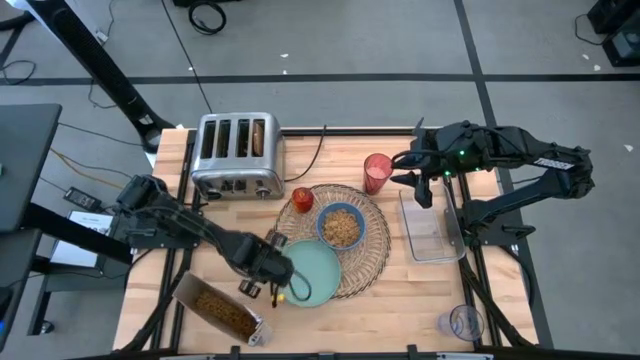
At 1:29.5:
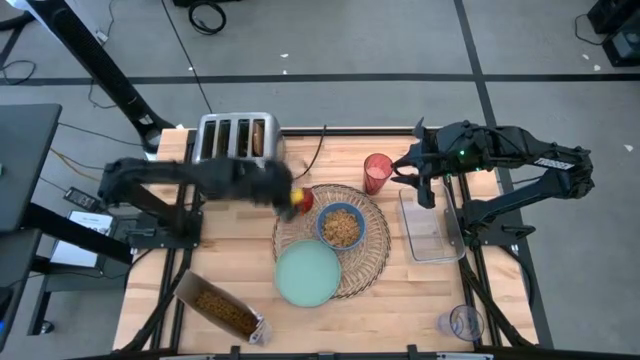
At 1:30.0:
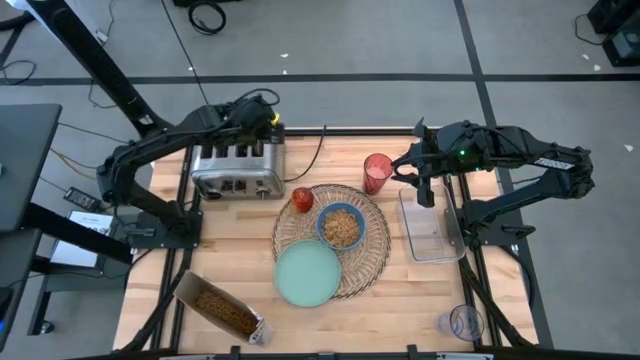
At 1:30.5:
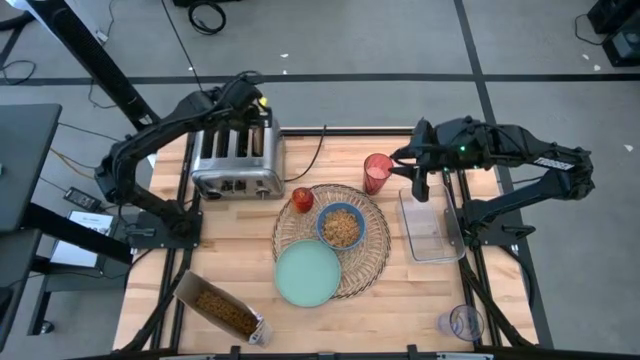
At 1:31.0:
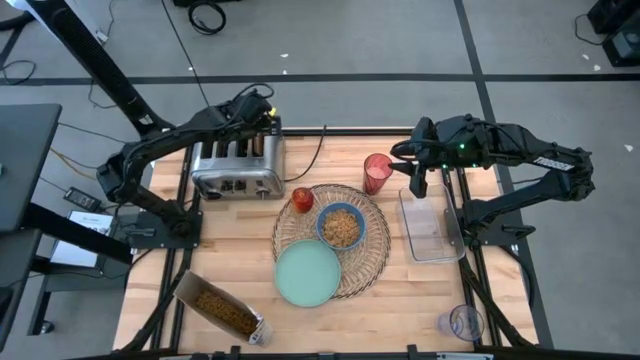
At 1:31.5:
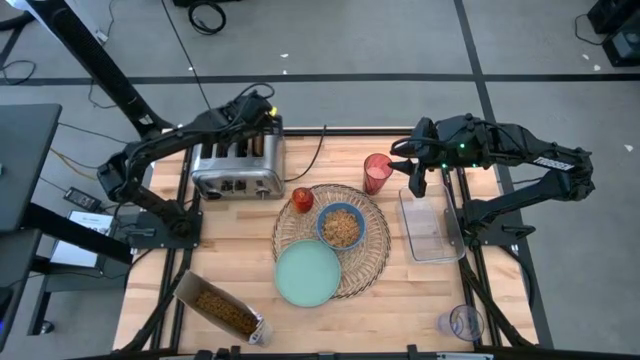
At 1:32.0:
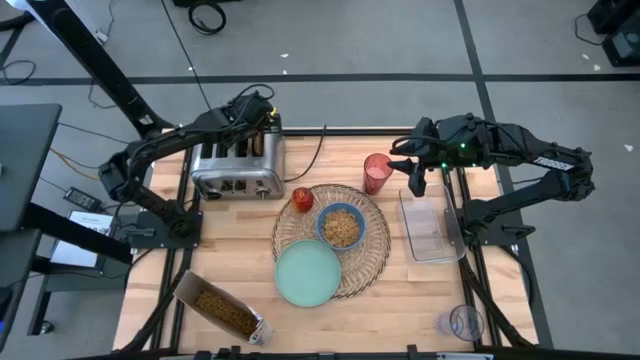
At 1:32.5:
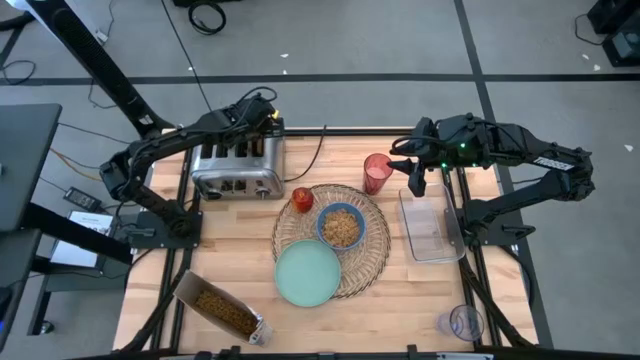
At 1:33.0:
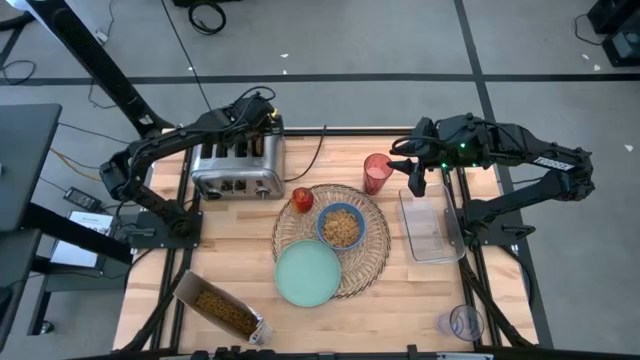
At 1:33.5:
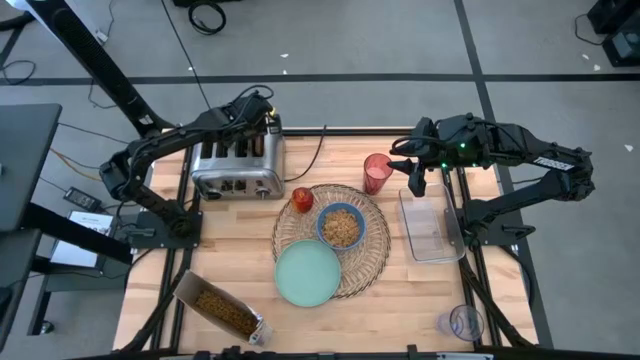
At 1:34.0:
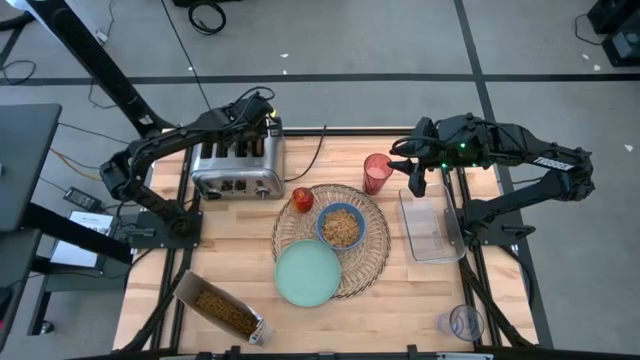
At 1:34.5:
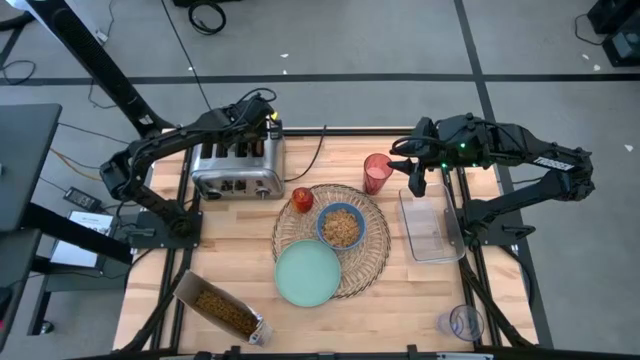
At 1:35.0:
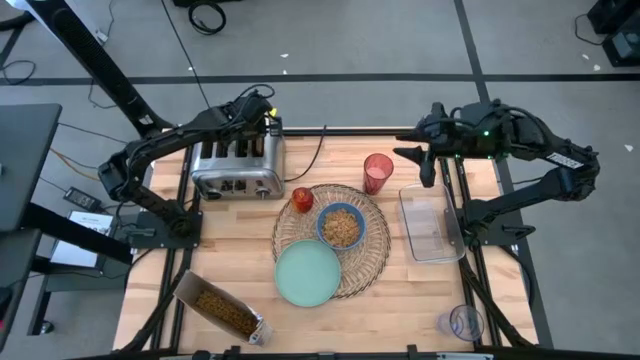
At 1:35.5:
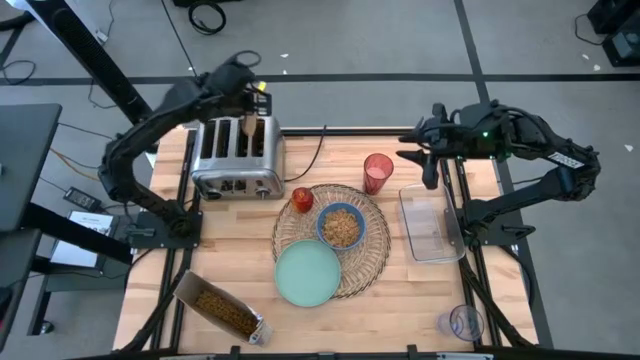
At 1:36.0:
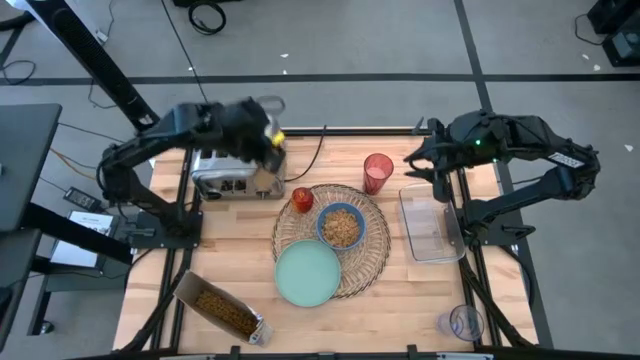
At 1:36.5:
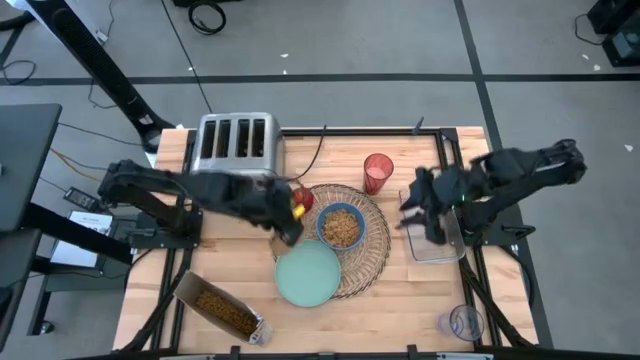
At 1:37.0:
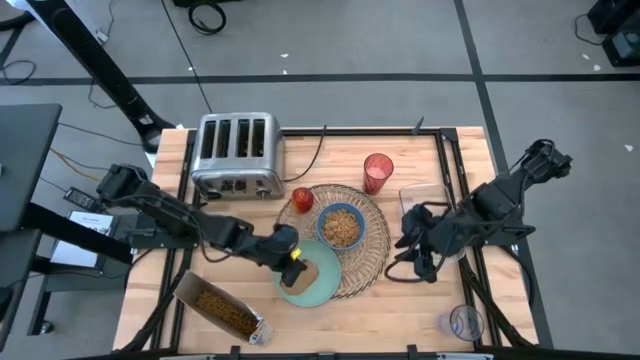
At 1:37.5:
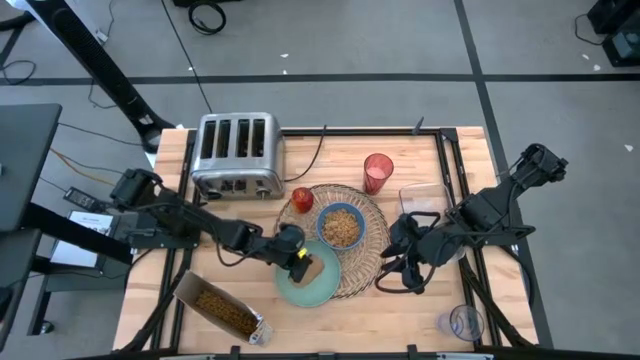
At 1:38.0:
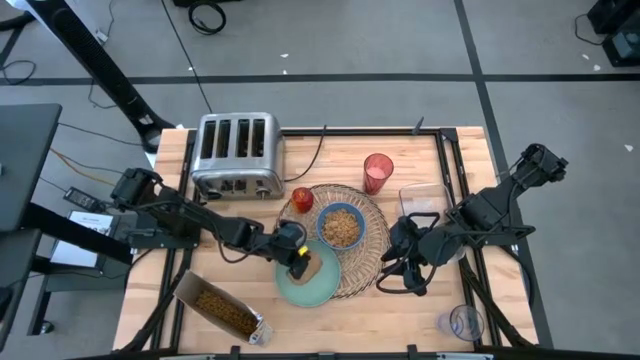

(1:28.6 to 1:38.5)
Task: Arrange a breakfast setting
Put the bagel on the light blue plate

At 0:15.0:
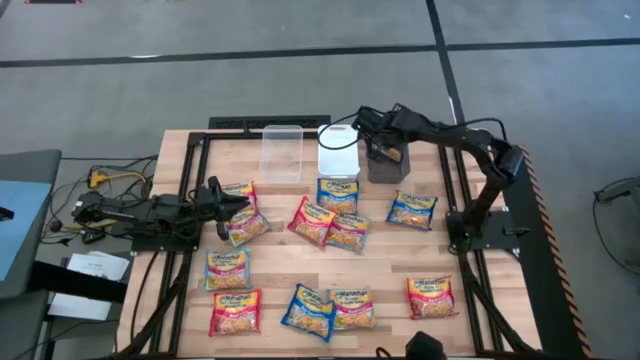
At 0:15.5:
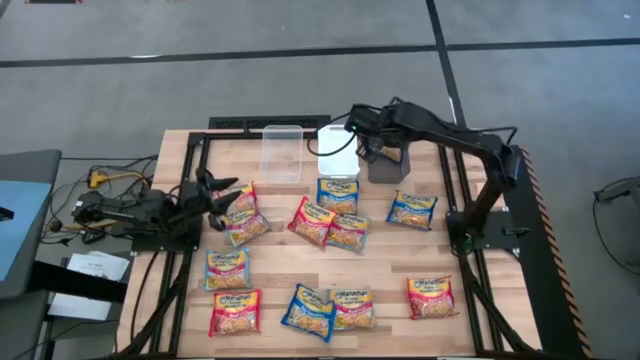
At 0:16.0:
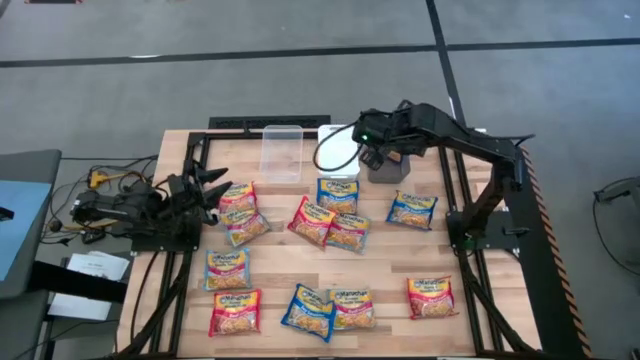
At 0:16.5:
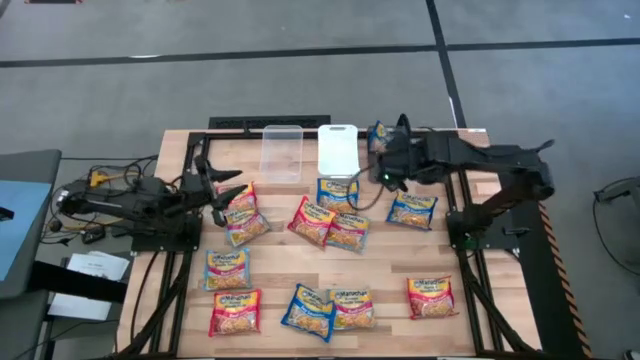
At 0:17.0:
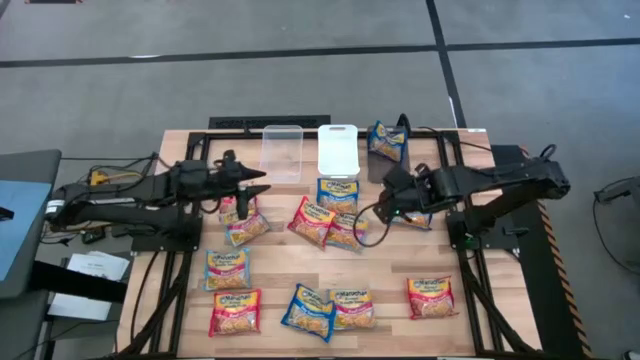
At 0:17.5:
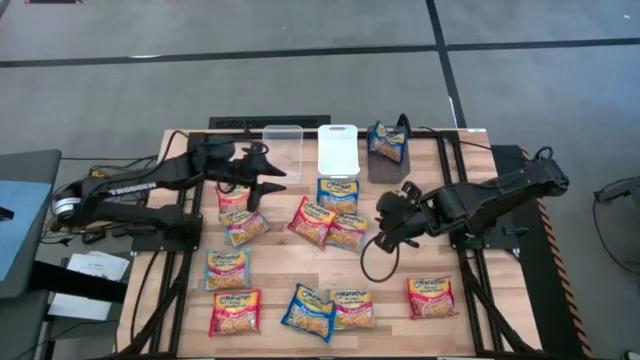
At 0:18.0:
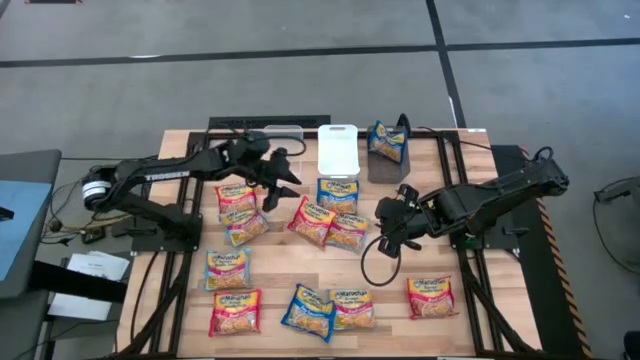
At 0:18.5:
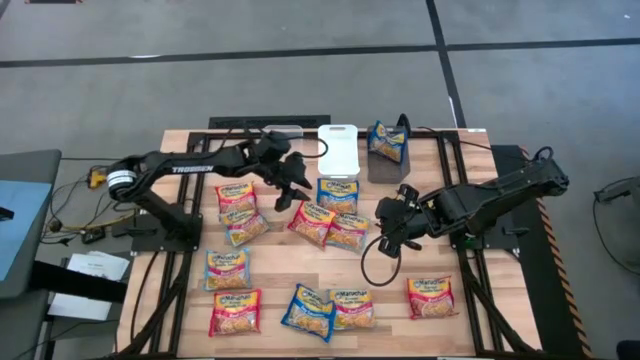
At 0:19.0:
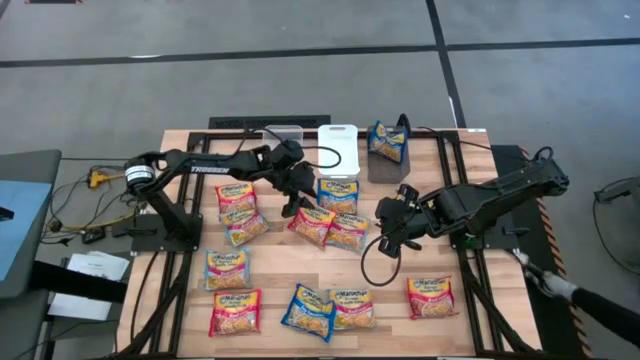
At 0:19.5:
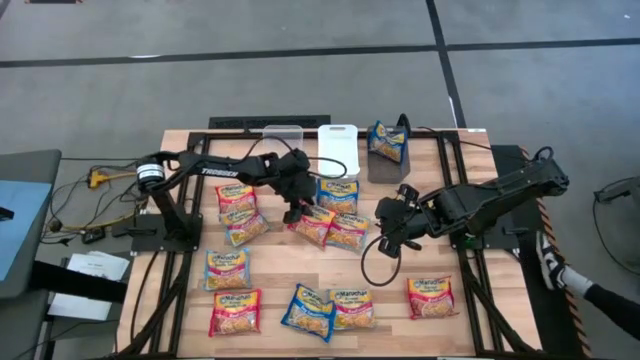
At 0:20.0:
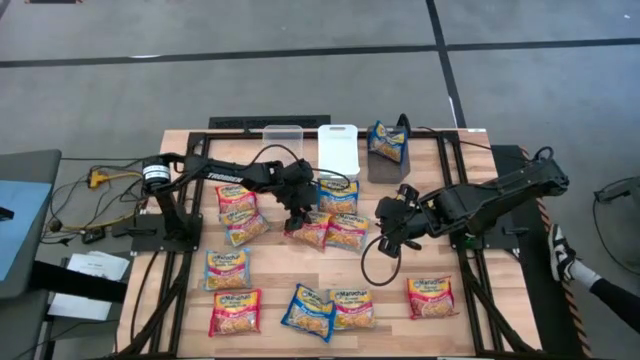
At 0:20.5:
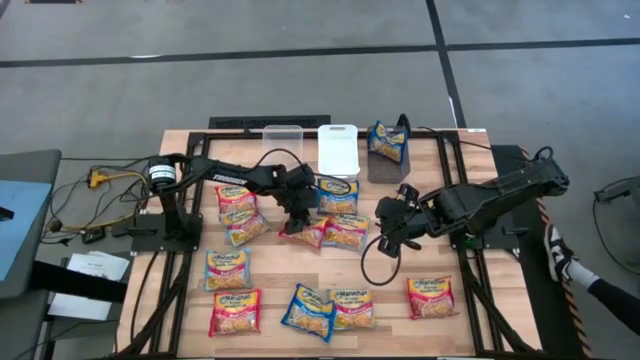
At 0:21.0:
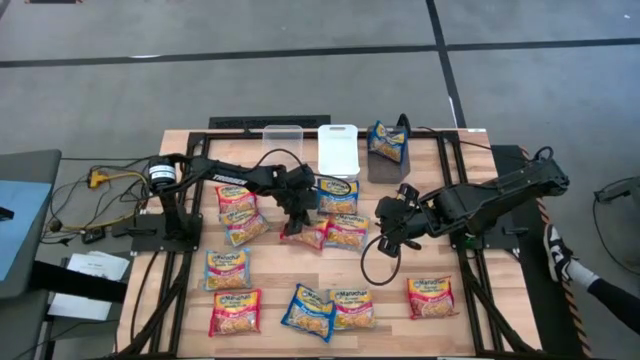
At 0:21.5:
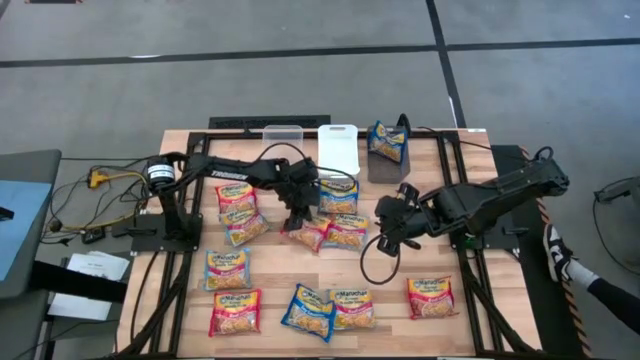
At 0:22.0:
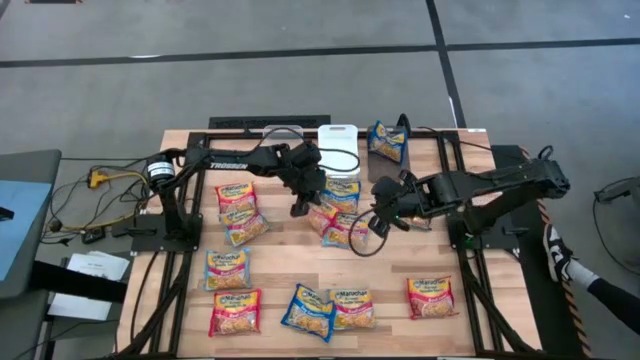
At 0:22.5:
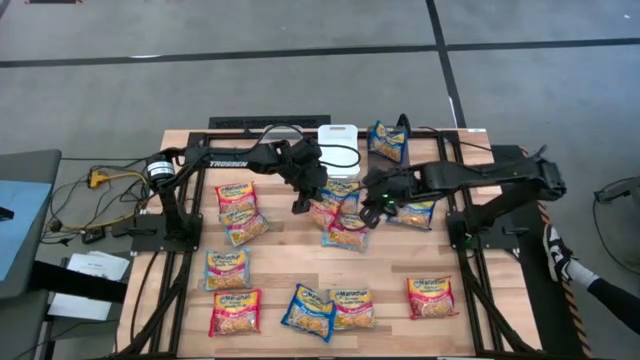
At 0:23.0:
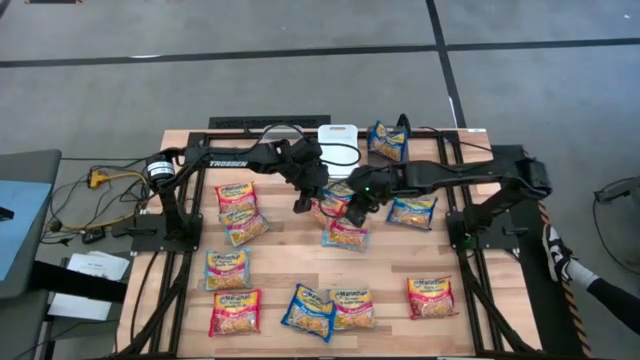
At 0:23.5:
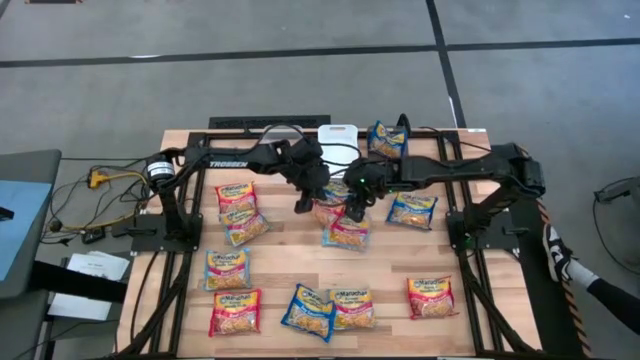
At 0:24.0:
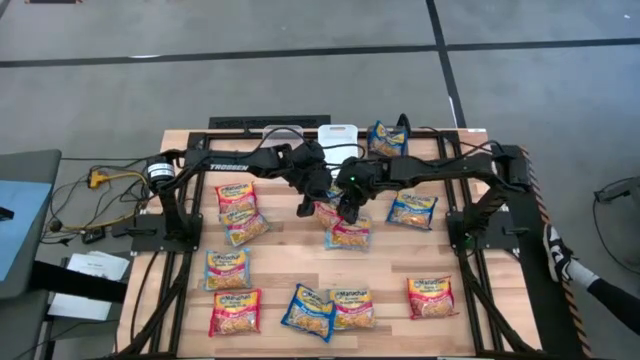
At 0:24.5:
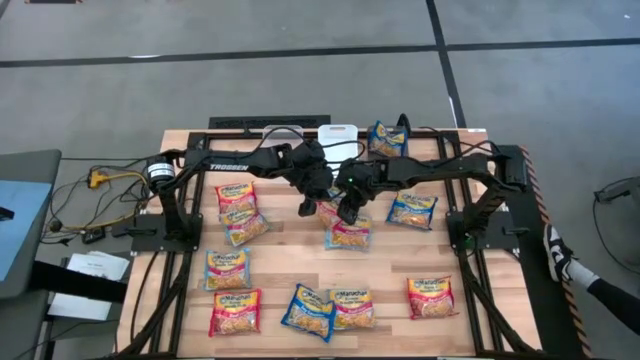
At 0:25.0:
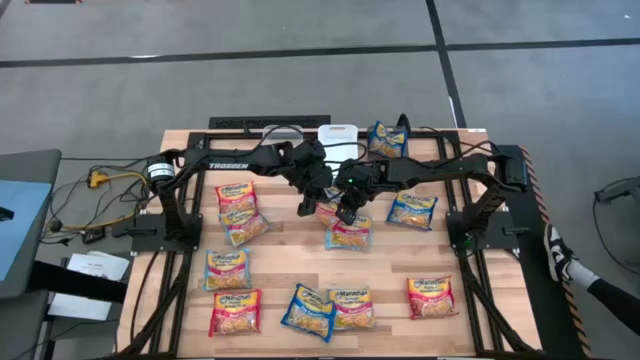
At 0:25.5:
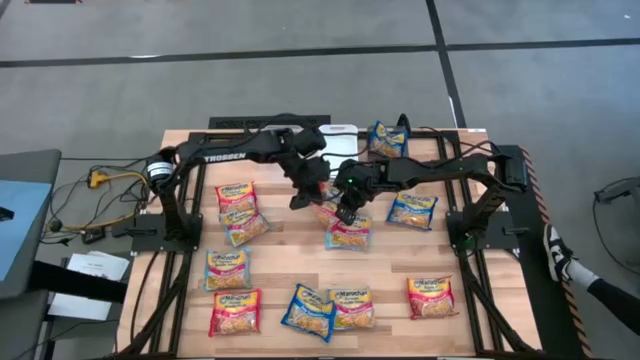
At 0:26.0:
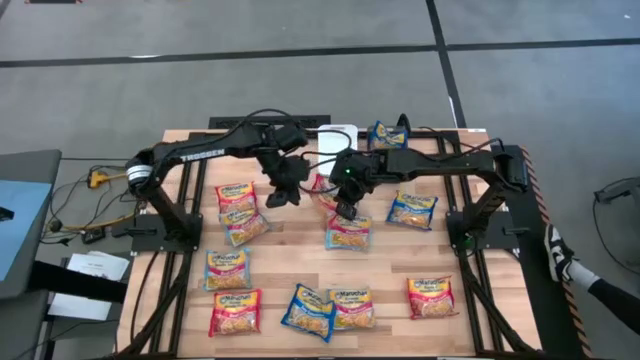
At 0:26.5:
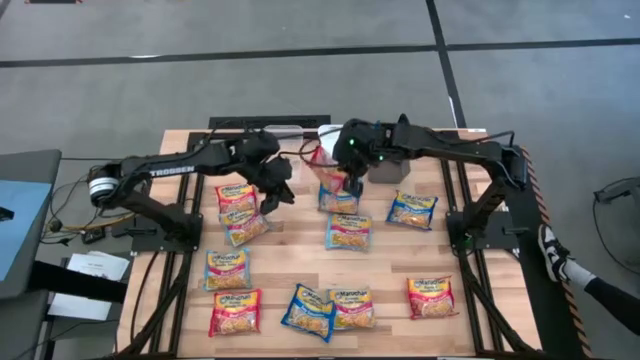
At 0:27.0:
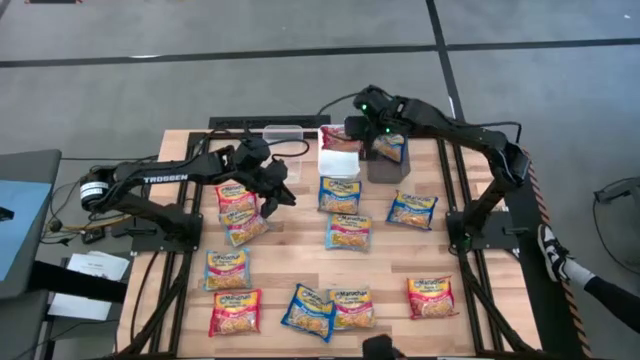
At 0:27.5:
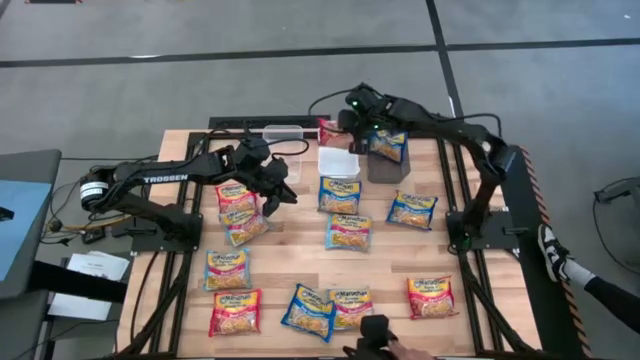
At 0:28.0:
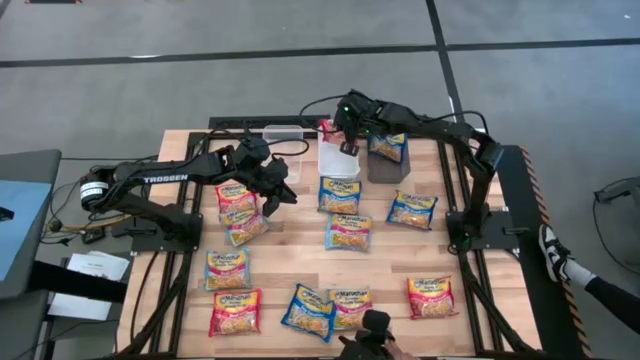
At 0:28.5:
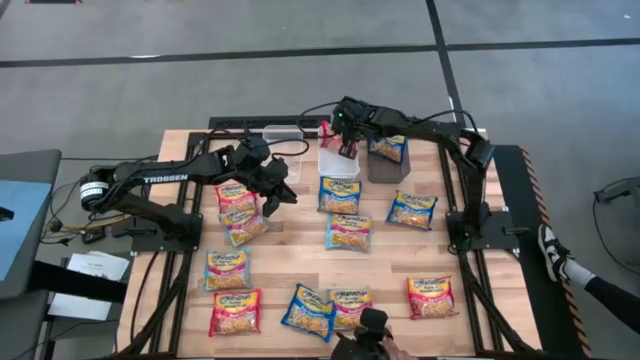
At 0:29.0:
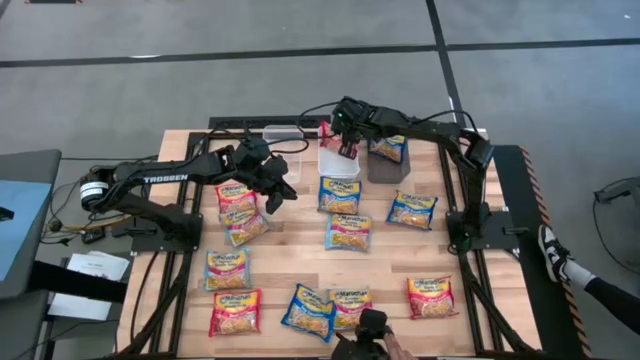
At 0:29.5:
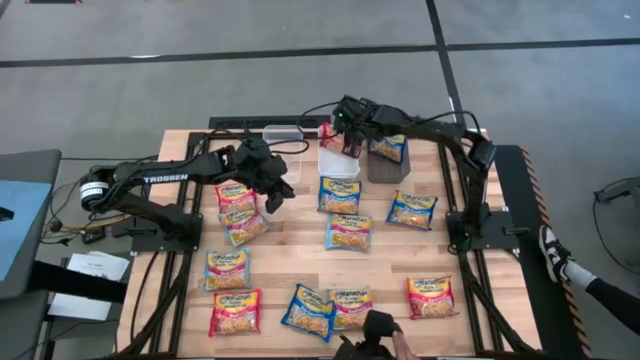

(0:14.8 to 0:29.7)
Task: Sort Maruchan noodles
Put the red noodle pack into the white bin
